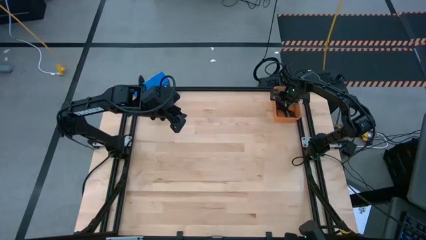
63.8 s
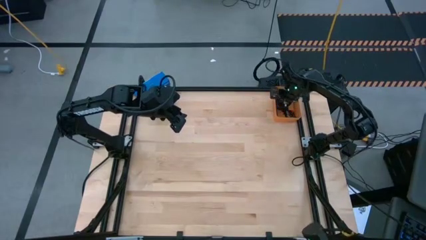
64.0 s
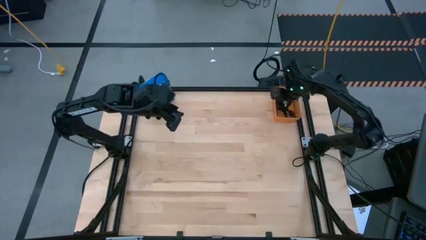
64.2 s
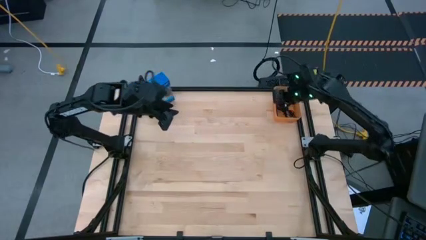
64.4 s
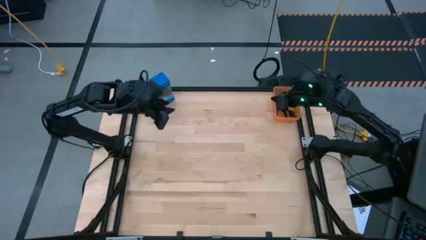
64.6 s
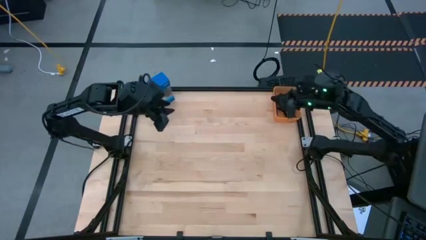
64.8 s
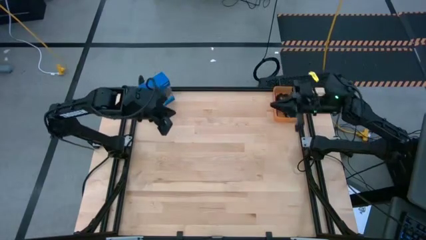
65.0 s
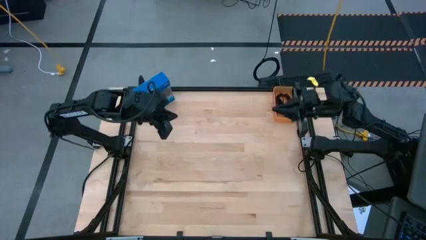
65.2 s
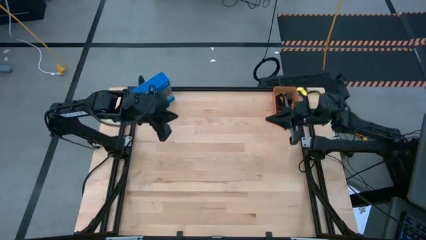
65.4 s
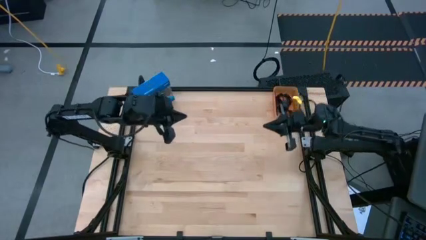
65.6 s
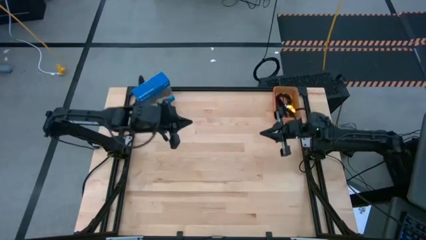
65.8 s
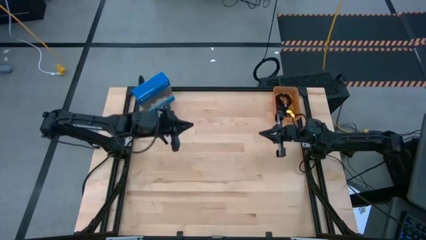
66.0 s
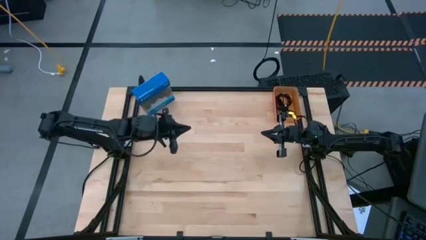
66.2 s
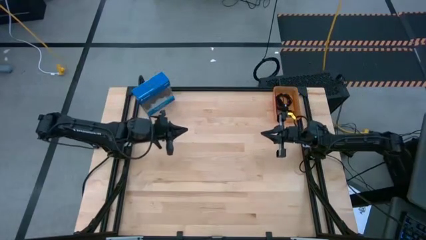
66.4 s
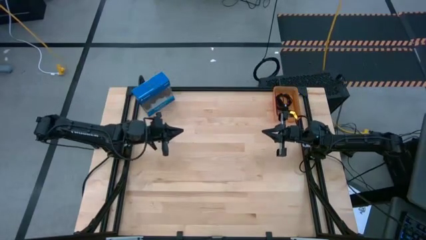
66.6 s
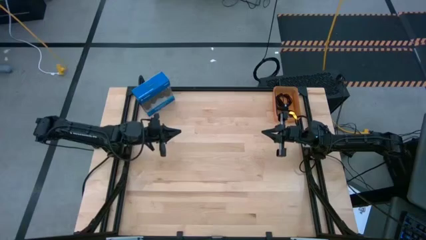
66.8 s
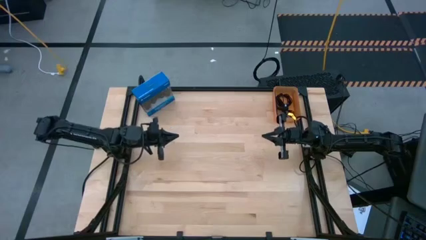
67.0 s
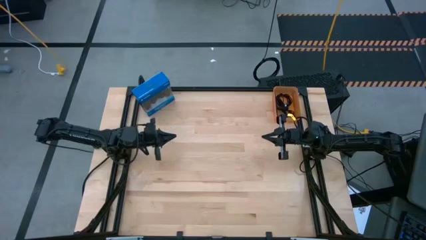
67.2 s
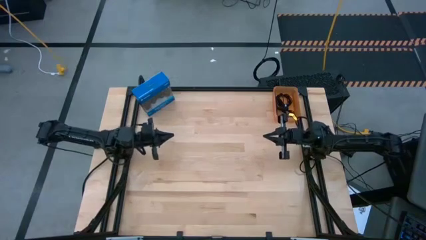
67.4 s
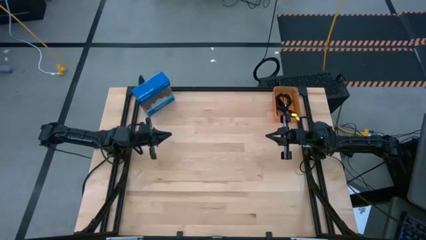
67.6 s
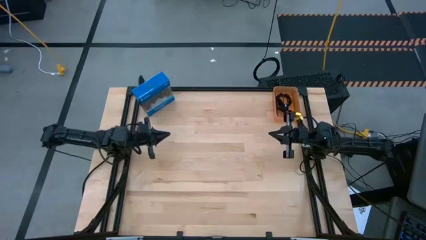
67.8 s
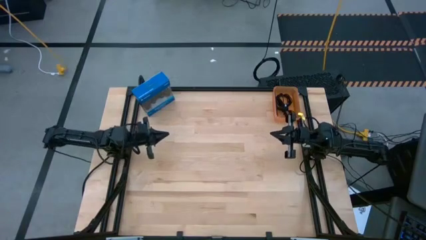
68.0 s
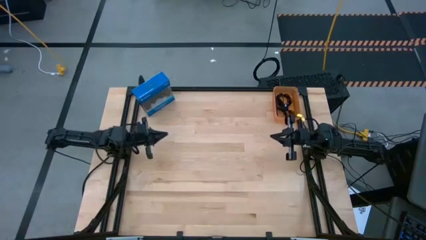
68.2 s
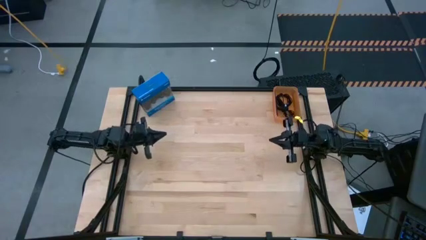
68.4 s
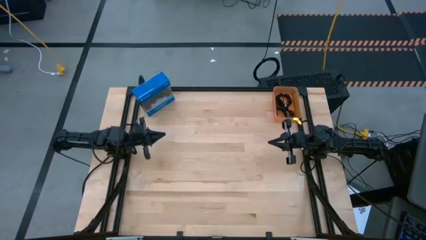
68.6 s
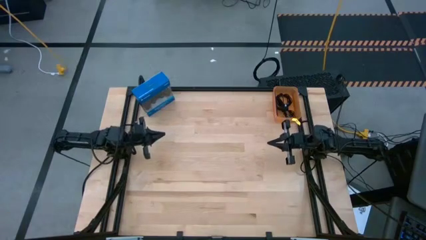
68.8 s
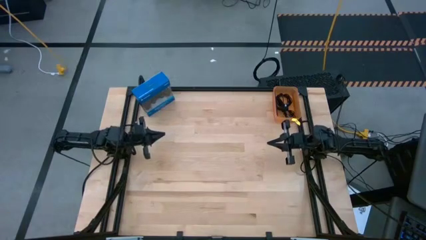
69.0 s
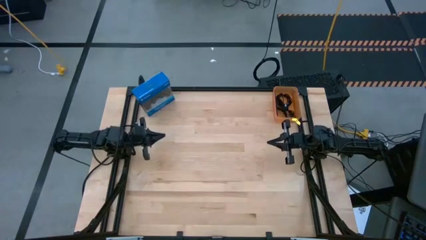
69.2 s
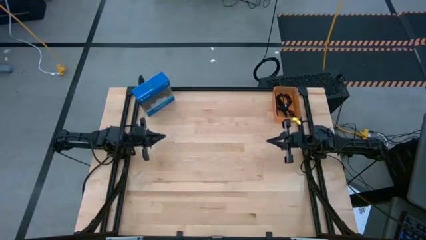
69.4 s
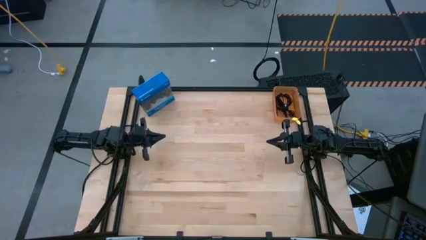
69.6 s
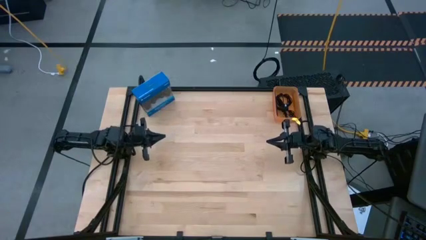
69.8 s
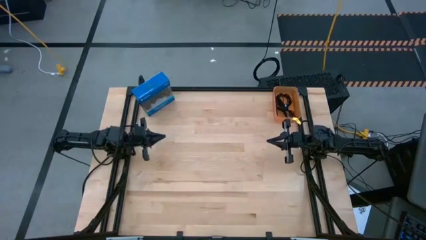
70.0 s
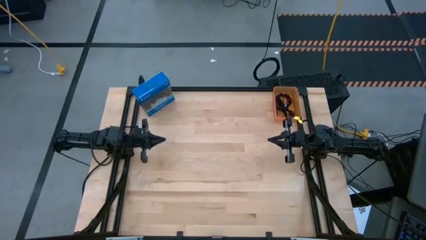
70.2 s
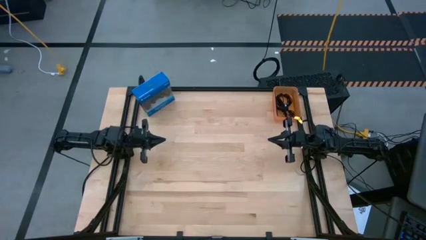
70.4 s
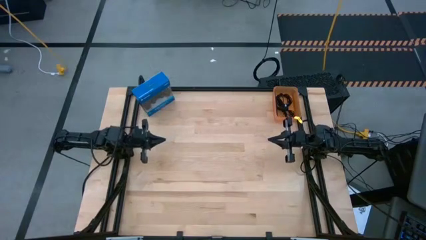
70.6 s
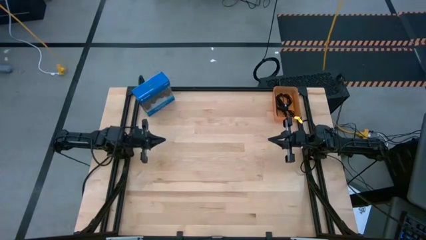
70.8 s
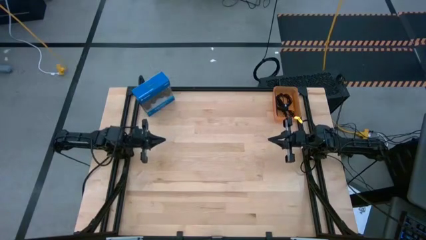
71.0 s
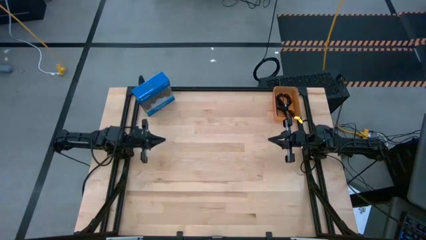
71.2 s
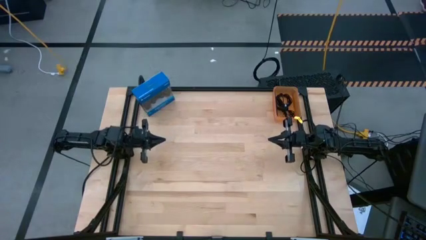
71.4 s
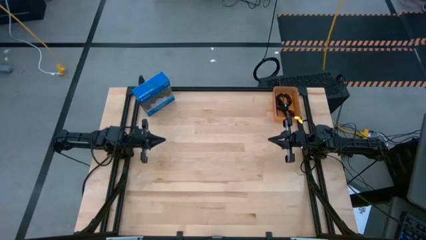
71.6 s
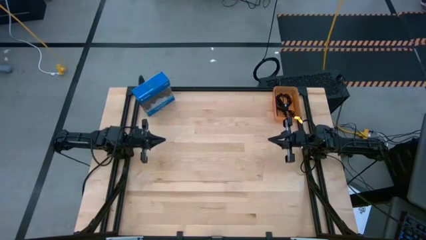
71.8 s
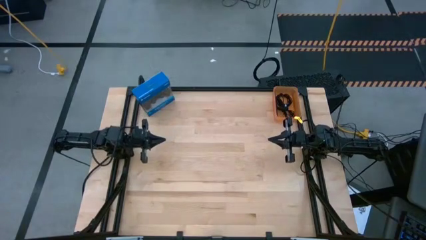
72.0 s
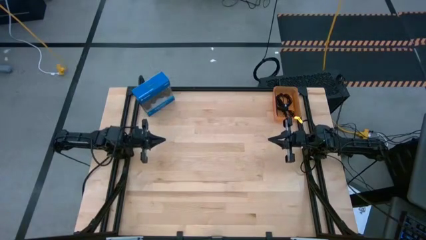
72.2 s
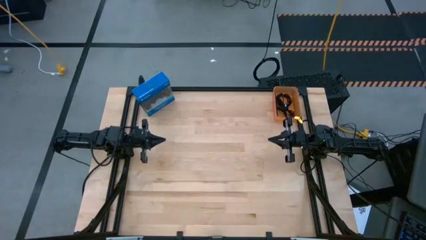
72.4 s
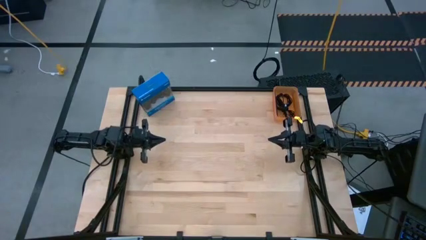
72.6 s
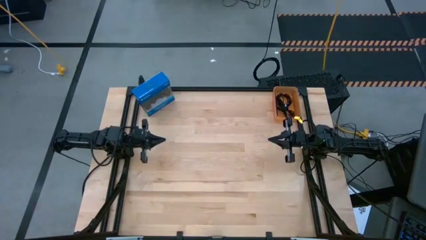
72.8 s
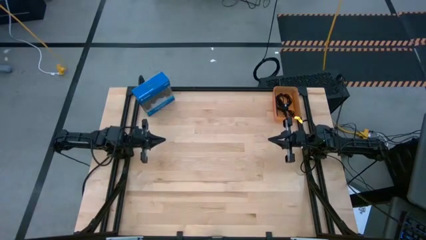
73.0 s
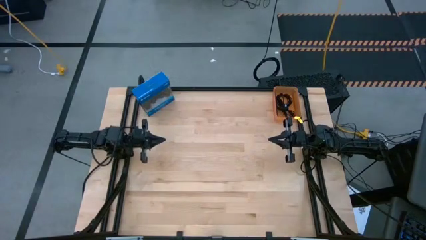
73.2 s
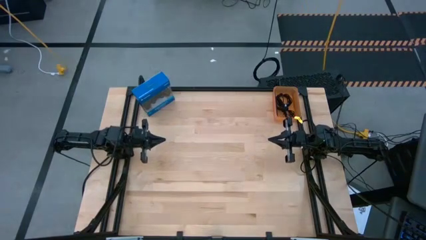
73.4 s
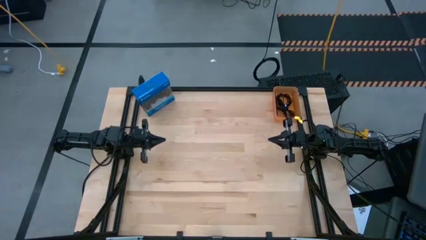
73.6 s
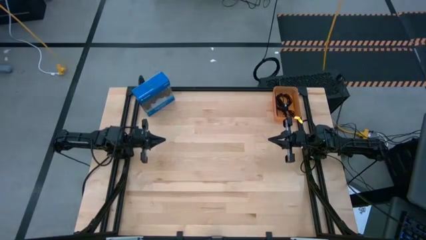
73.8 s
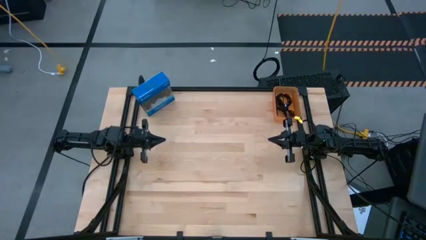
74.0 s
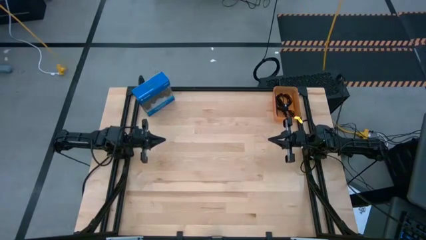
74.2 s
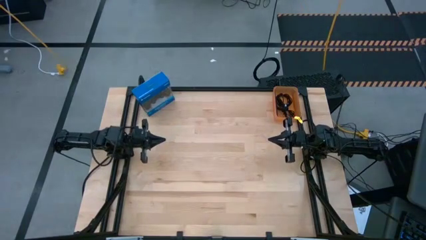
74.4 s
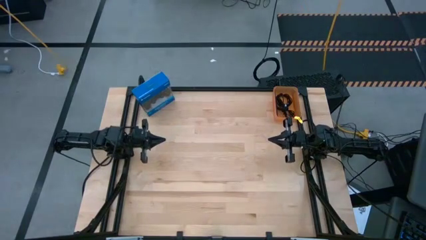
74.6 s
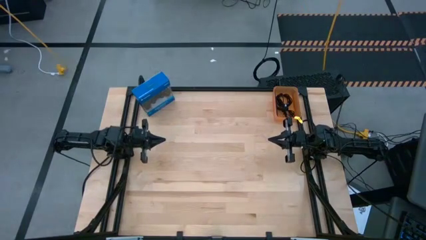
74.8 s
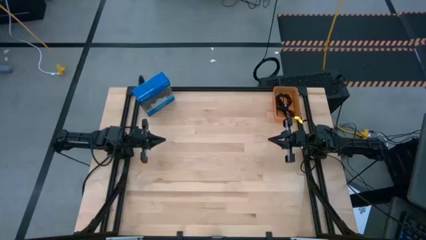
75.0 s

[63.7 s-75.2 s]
Task: Pick and place USB-C Cables
Return to Home Position
